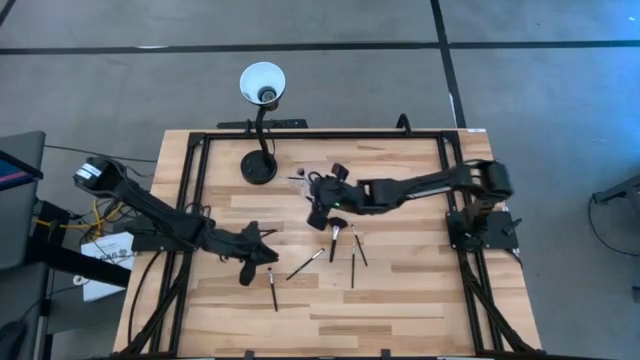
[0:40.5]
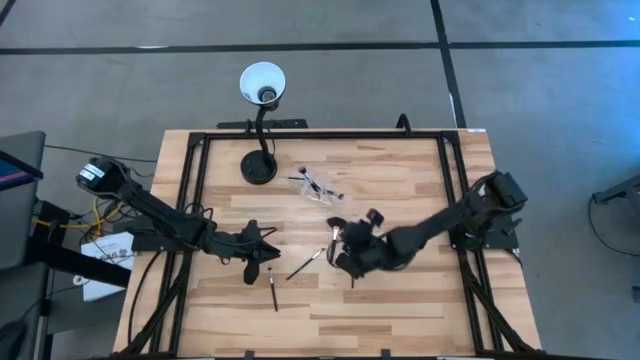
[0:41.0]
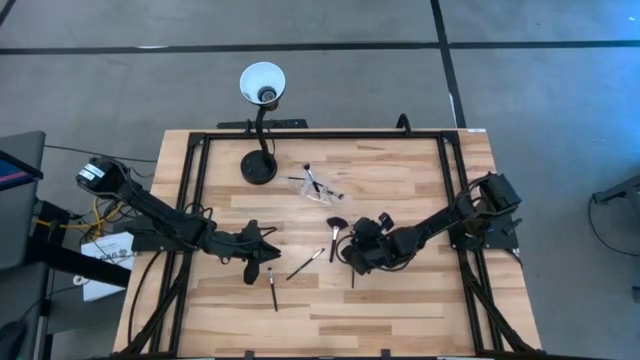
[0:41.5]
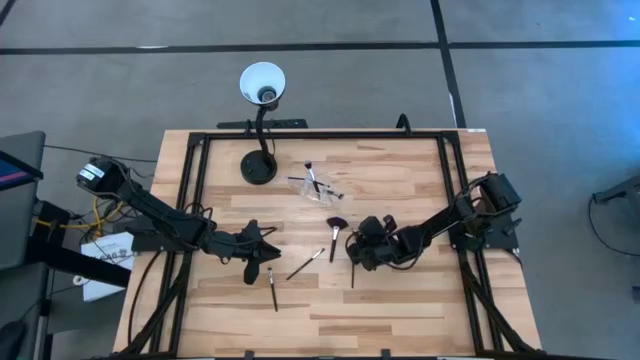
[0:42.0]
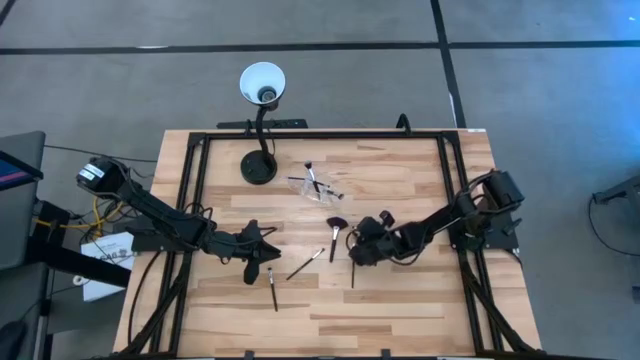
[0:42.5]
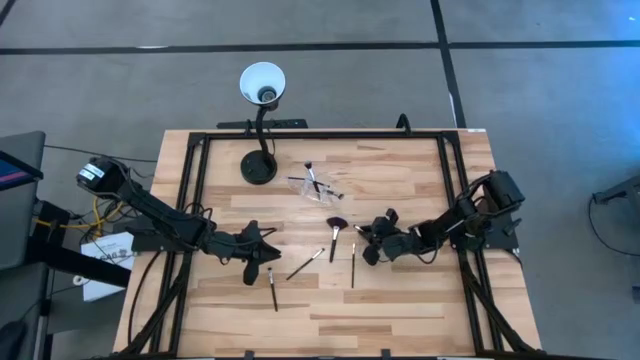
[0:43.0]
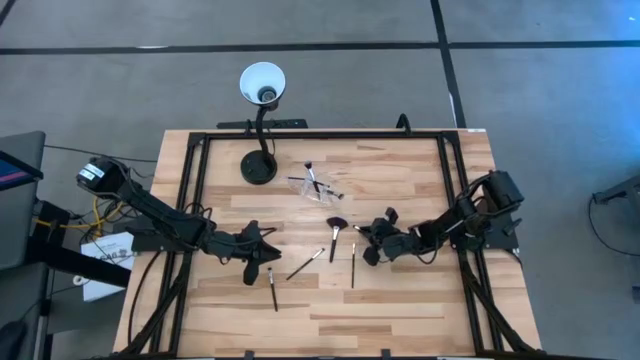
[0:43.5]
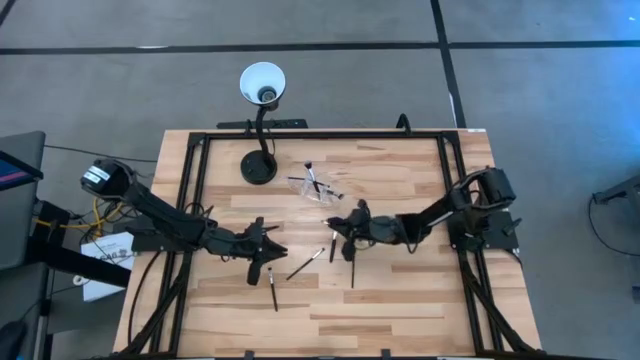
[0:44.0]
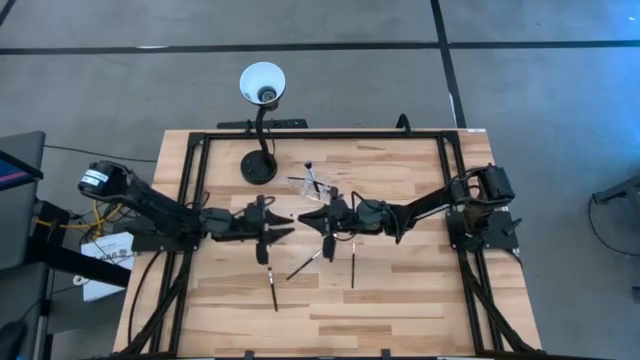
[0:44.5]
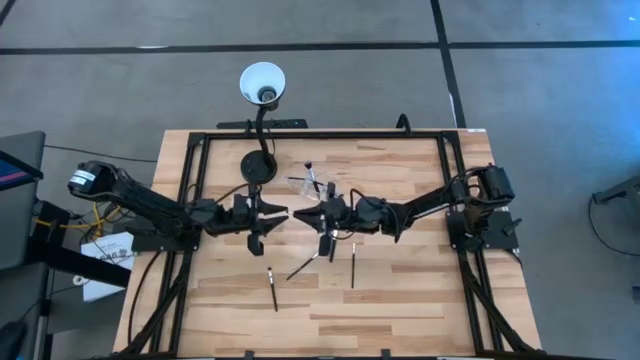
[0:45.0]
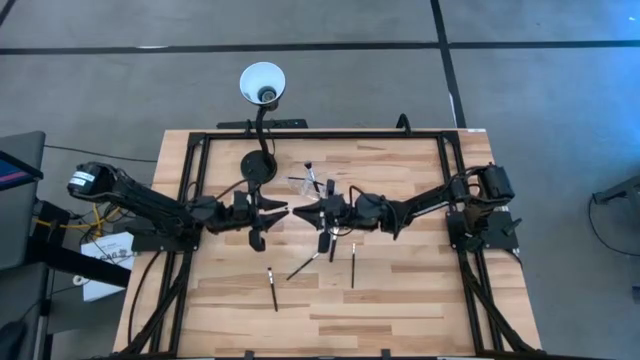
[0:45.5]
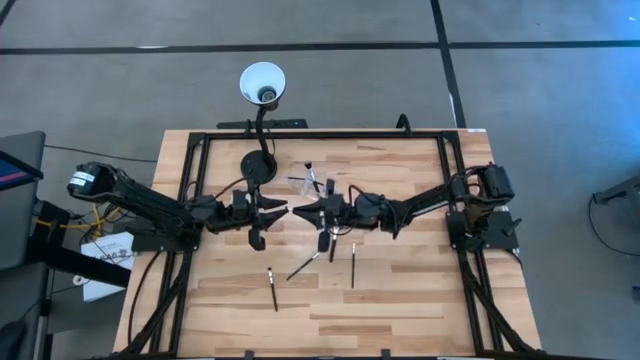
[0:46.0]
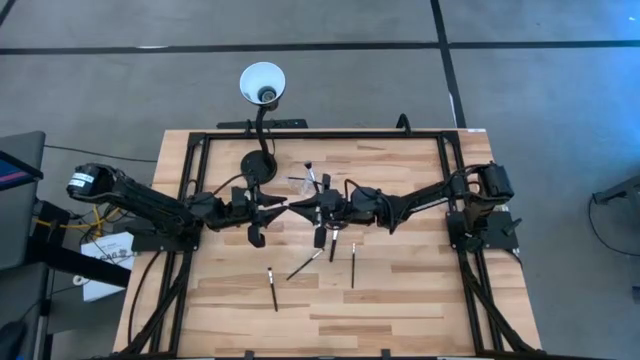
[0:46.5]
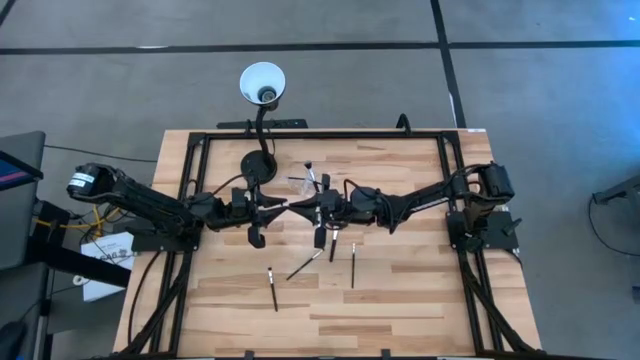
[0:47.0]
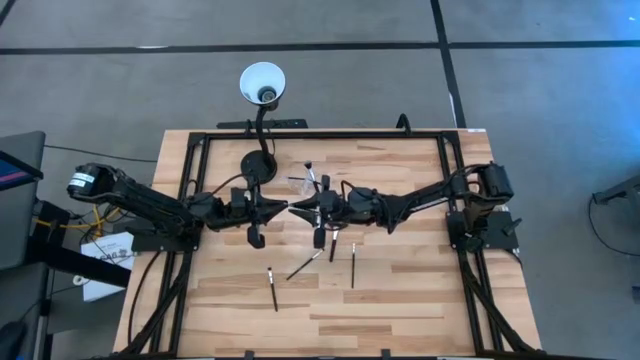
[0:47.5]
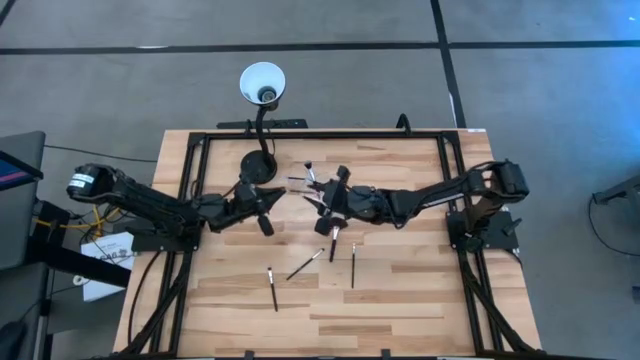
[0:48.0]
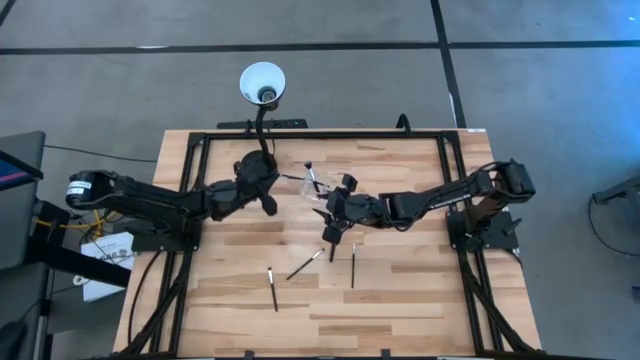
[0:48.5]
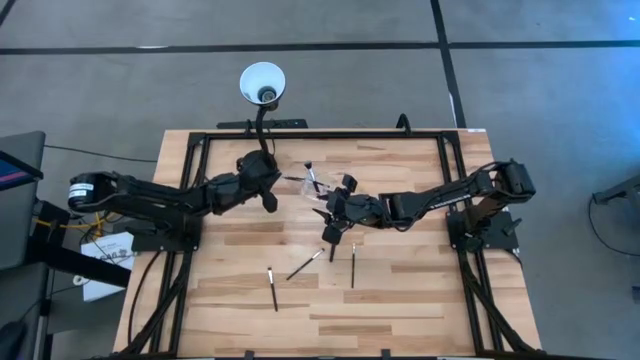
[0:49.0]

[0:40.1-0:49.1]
Task: Sort items
Put the eyeshadow brush into the left section of the transparent organizer

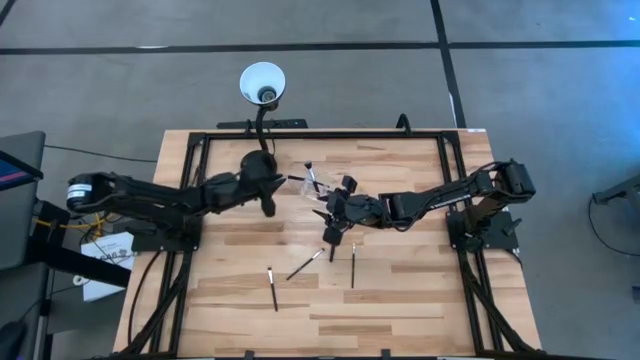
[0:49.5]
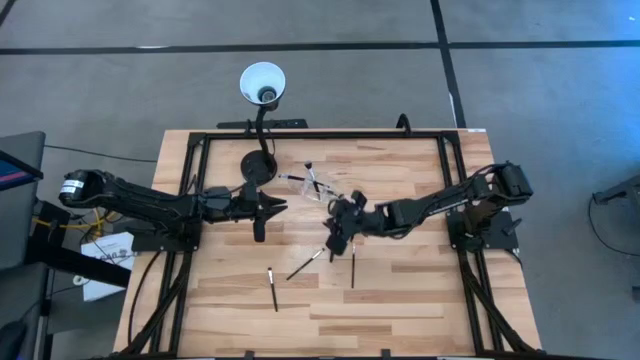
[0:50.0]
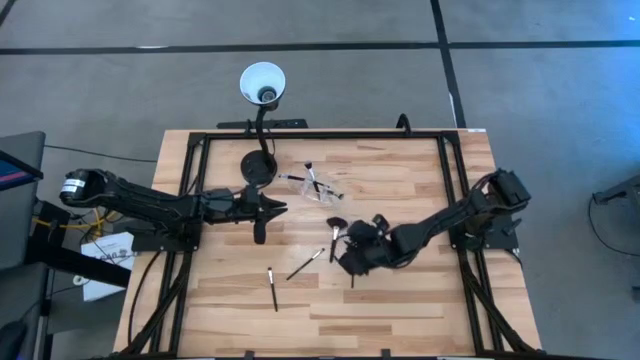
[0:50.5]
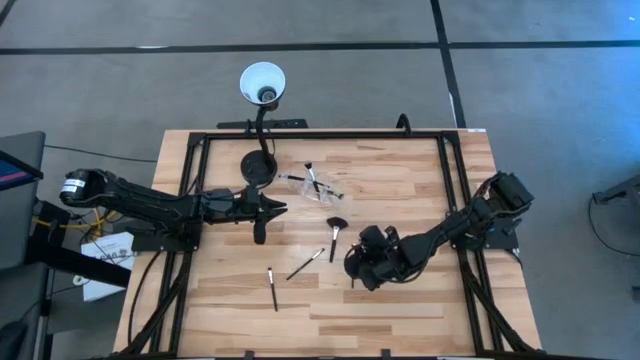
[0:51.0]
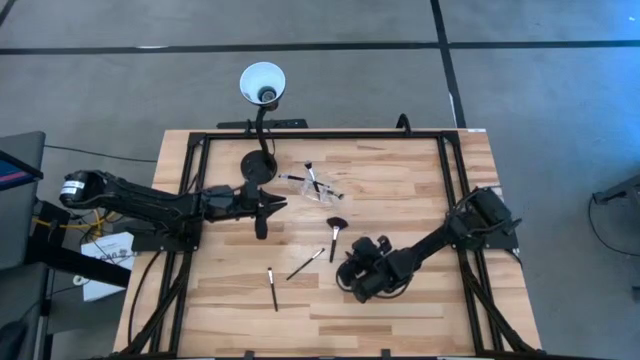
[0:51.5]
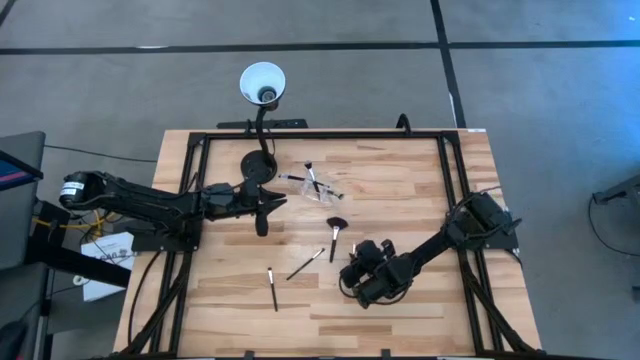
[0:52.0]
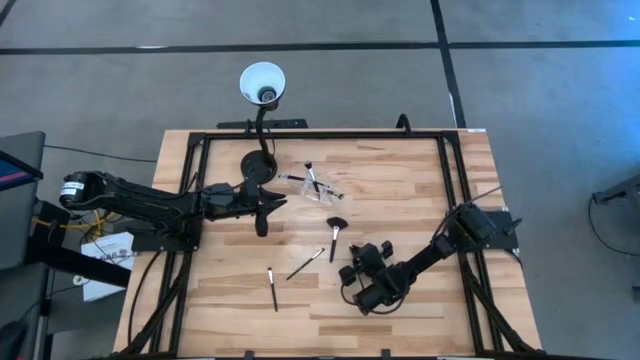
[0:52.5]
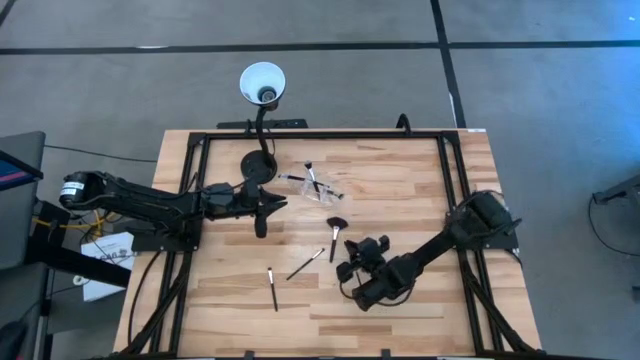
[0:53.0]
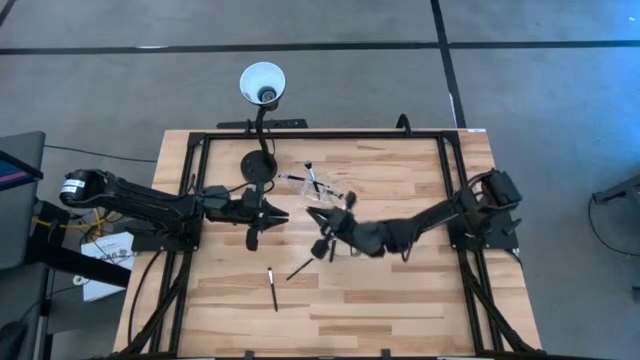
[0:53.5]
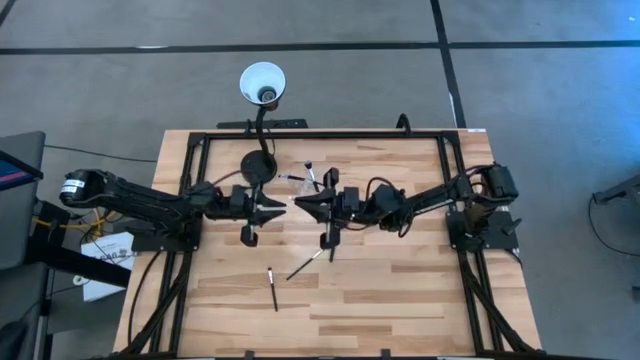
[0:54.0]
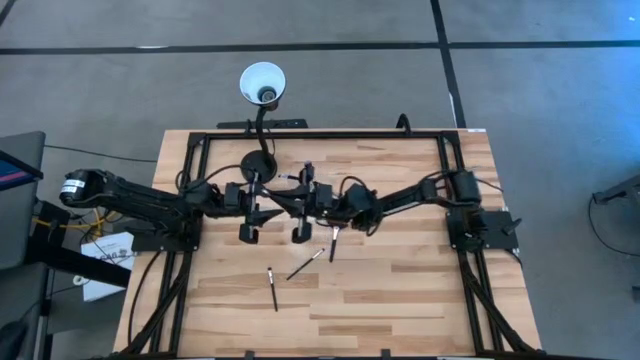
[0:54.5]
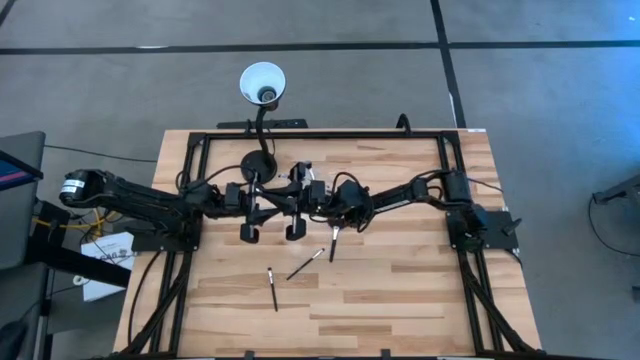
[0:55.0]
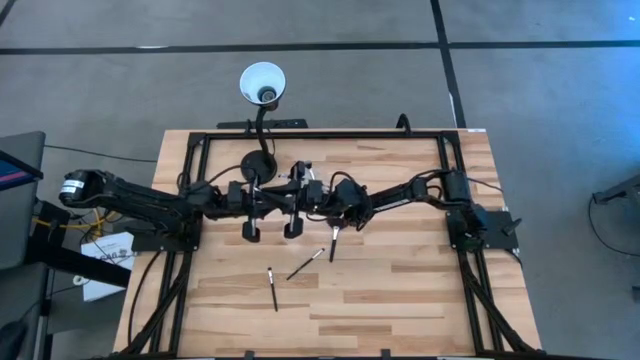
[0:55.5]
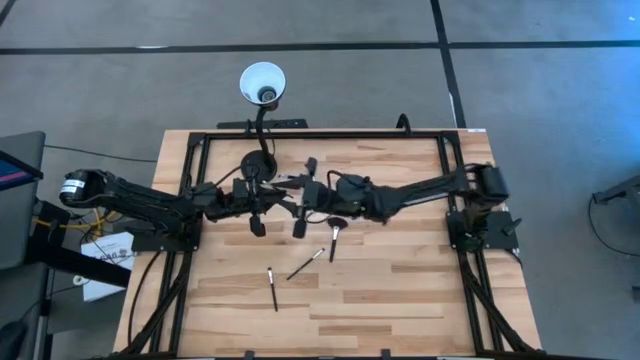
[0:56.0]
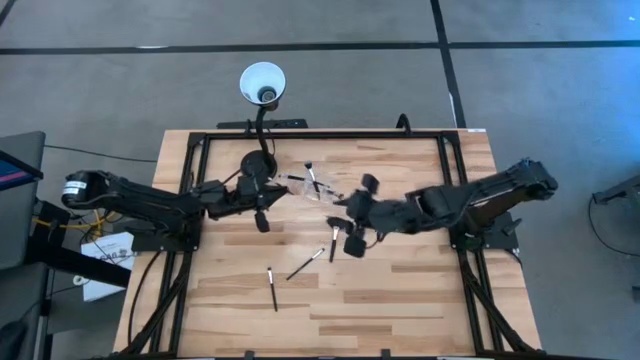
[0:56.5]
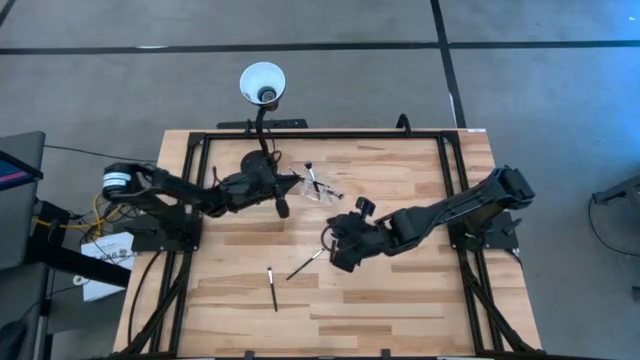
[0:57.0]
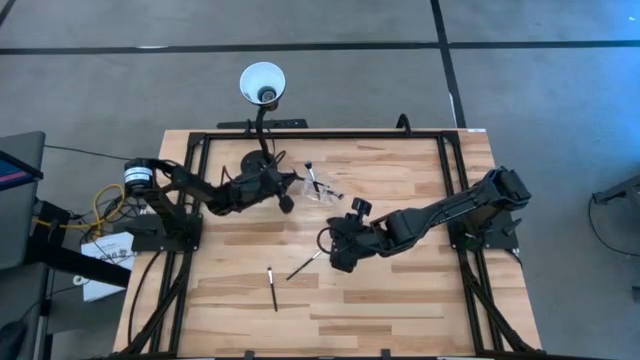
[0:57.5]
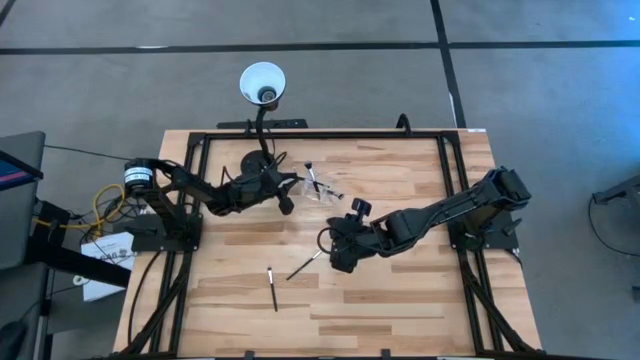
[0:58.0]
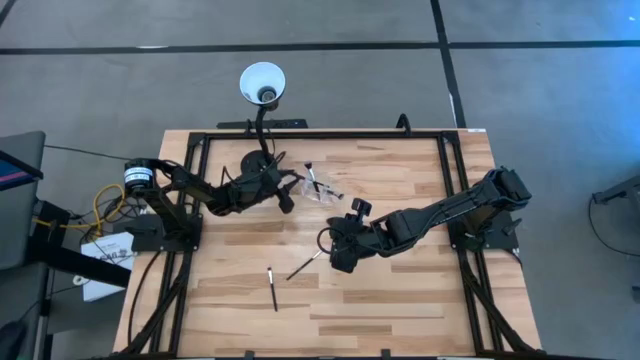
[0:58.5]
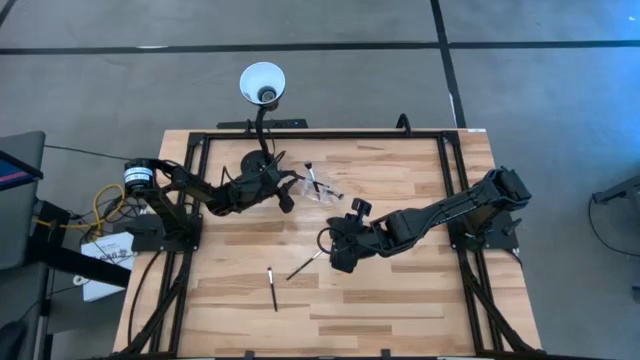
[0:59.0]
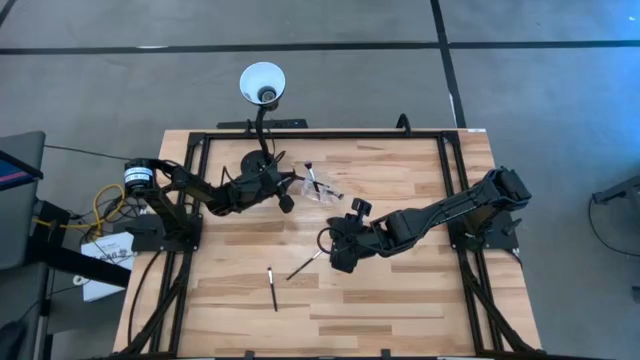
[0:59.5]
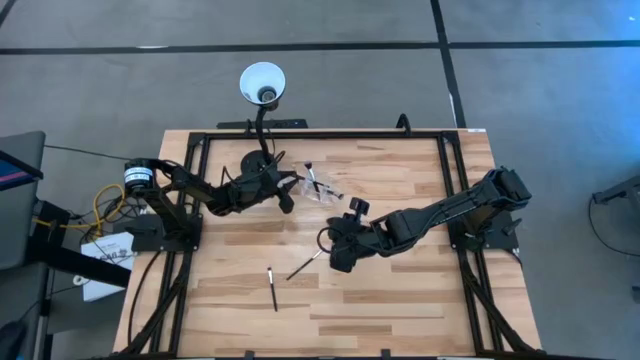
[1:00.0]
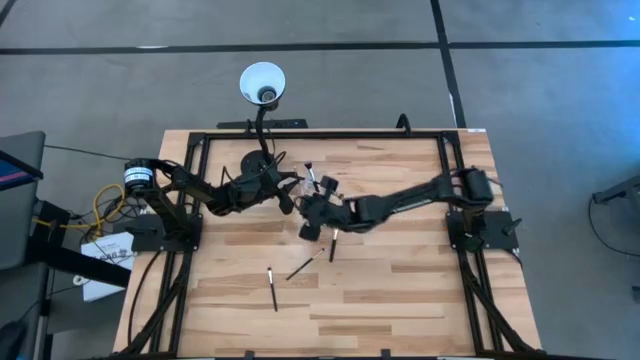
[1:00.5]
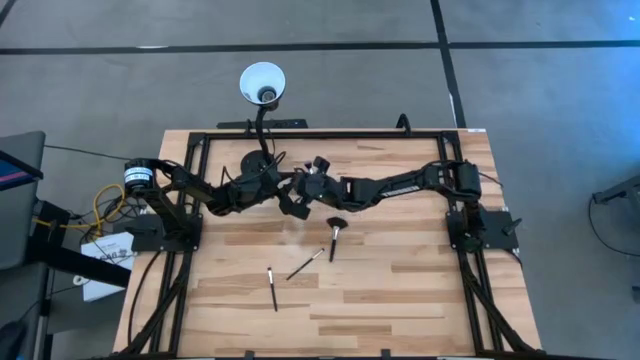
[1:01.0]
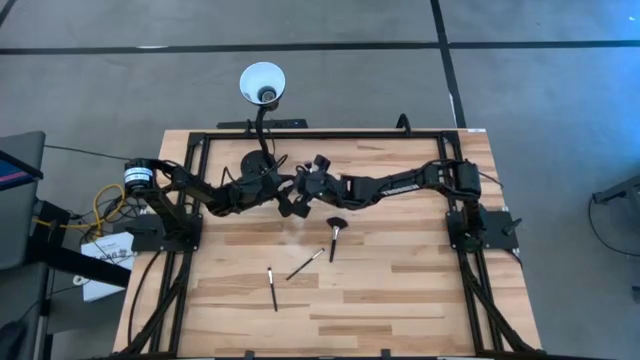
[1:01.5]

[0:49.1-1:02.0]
Put the eyeshadow brush into the left section of the transparent organizer

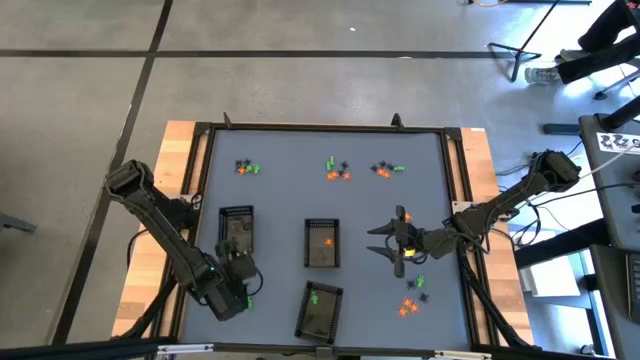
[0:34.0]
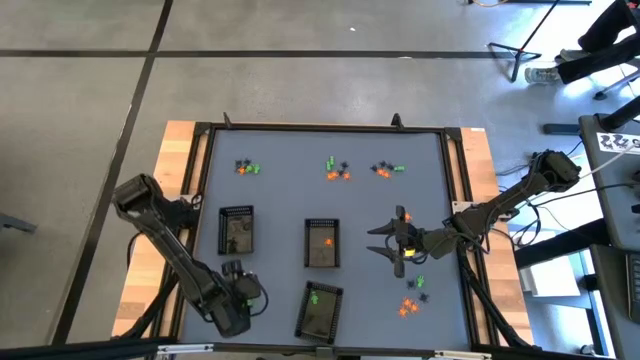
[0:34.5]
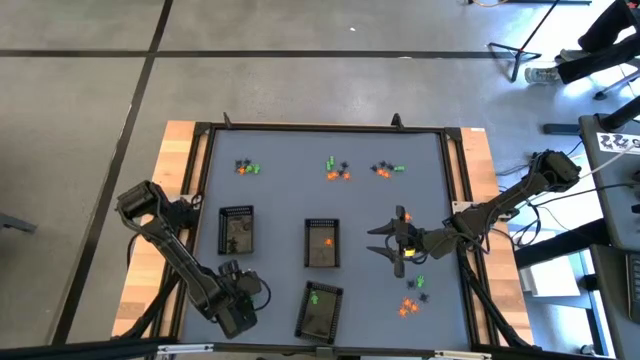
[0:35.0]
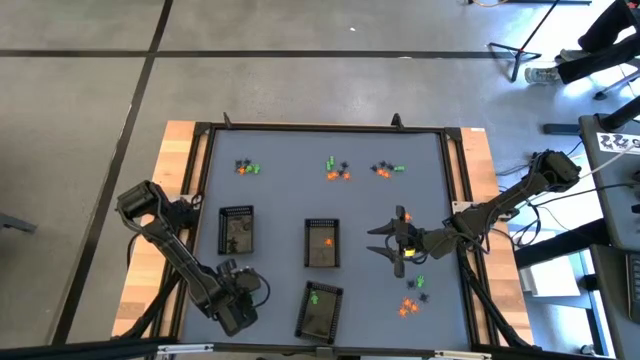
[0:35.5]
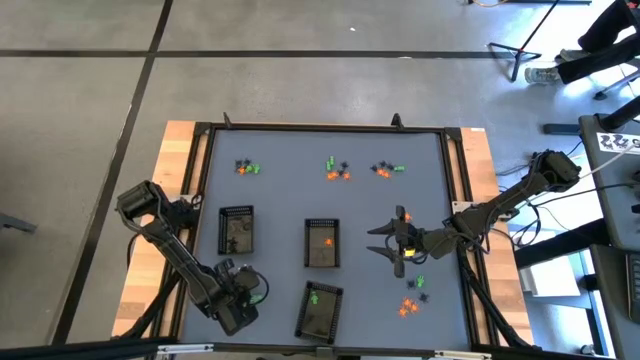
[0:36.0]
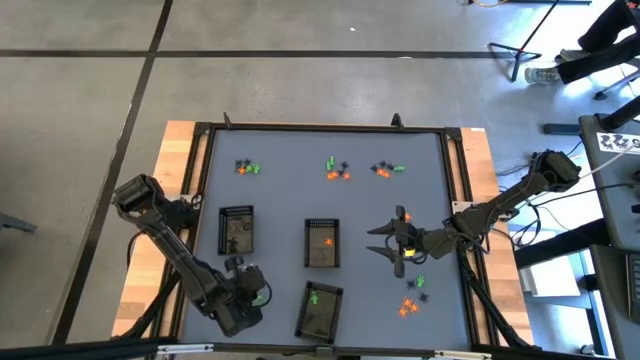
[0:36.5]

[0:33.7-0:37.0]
Task: Sort Halloween decoration
Put the green toy skeleton into the bottom black basket
